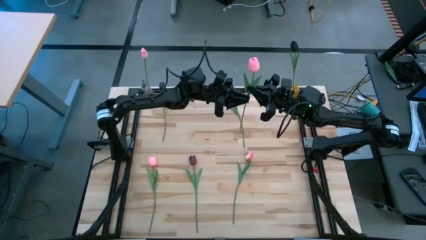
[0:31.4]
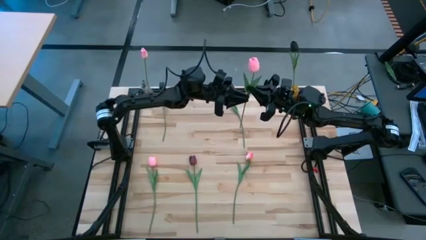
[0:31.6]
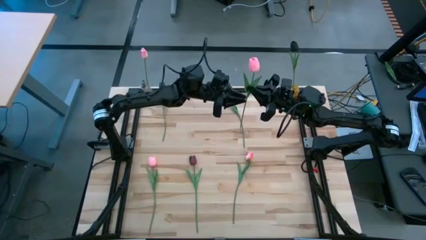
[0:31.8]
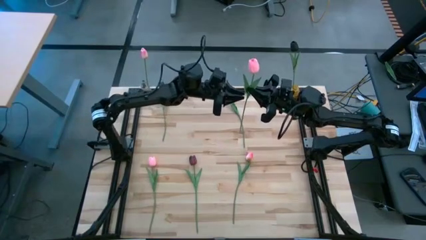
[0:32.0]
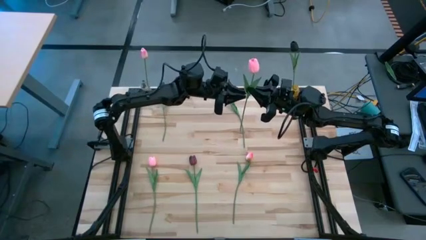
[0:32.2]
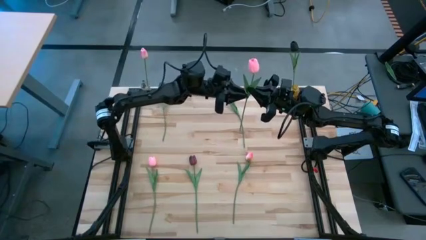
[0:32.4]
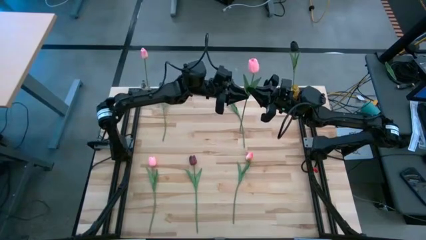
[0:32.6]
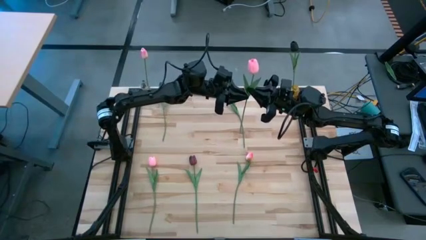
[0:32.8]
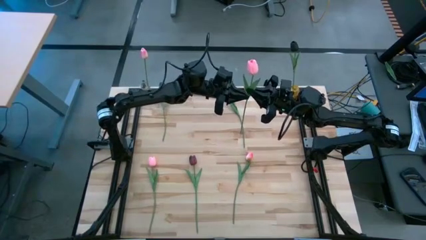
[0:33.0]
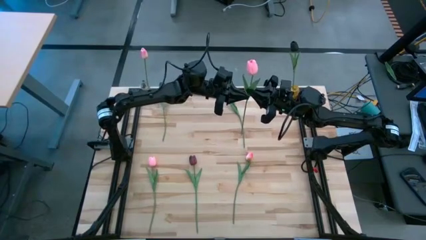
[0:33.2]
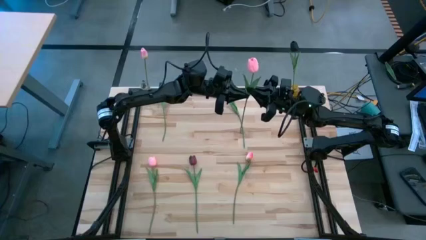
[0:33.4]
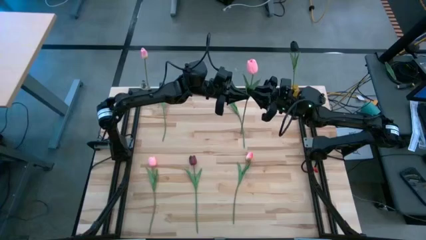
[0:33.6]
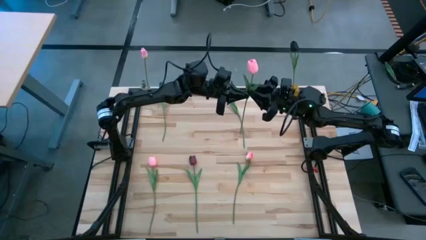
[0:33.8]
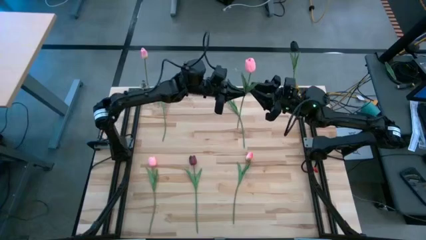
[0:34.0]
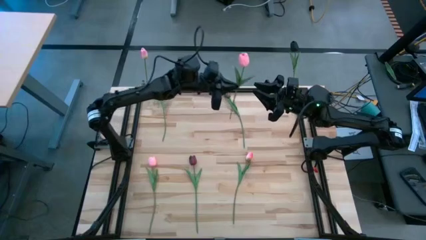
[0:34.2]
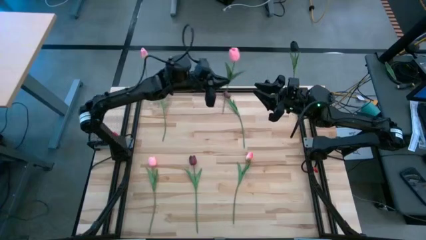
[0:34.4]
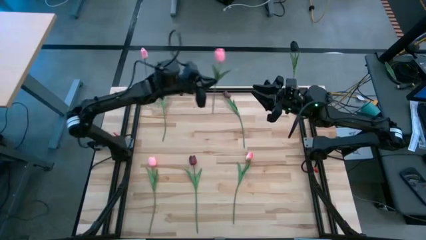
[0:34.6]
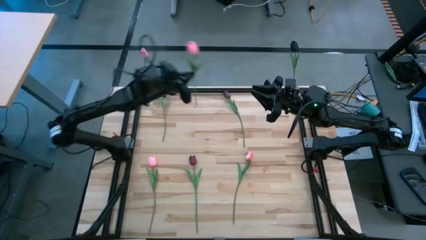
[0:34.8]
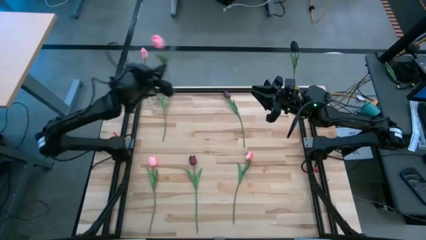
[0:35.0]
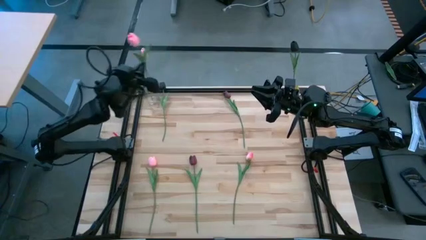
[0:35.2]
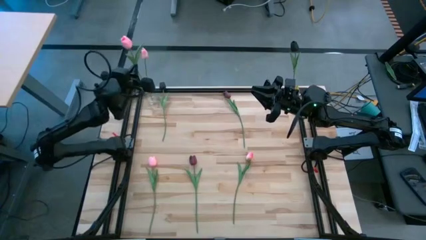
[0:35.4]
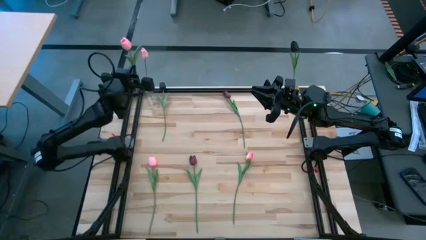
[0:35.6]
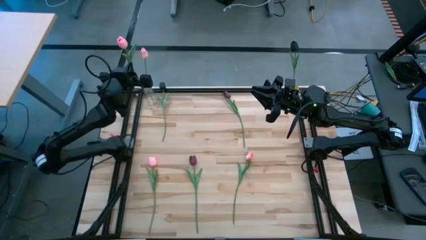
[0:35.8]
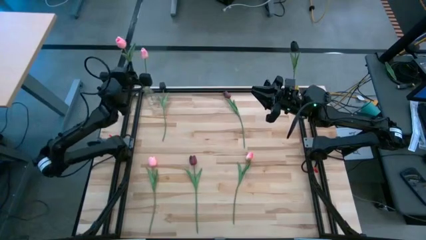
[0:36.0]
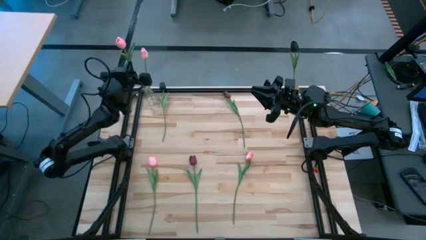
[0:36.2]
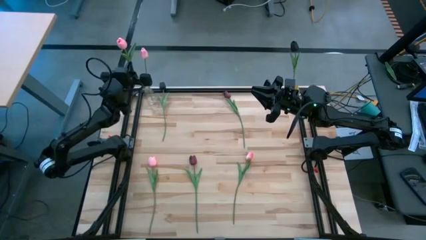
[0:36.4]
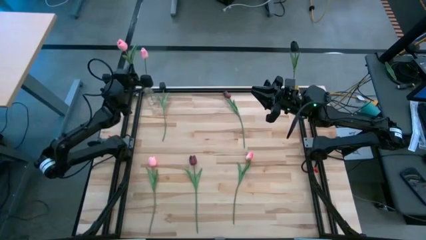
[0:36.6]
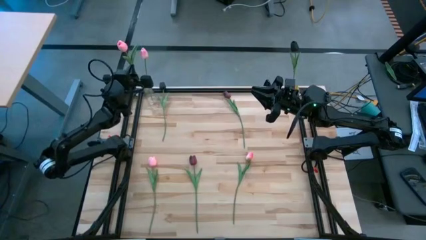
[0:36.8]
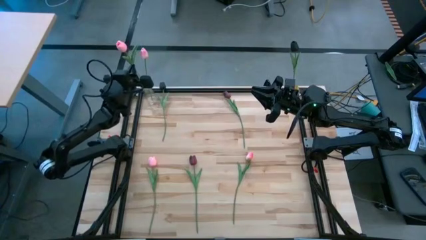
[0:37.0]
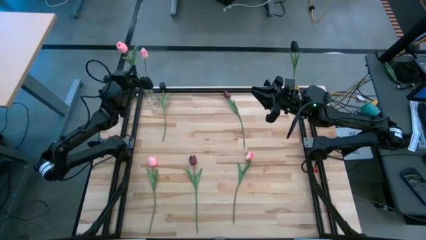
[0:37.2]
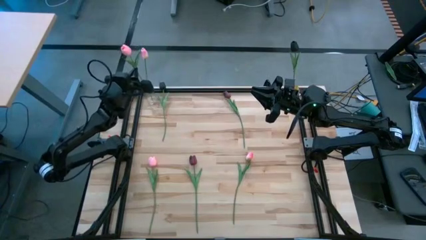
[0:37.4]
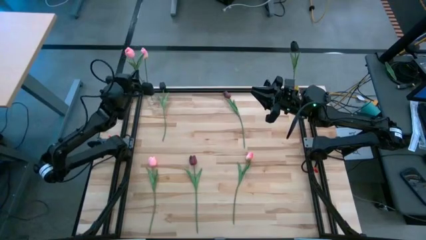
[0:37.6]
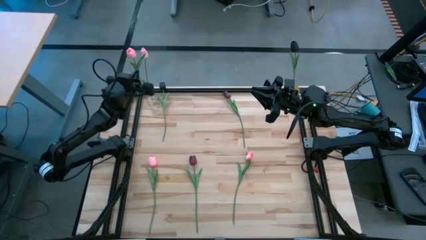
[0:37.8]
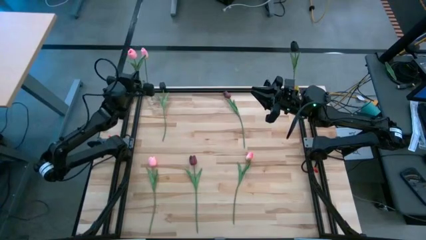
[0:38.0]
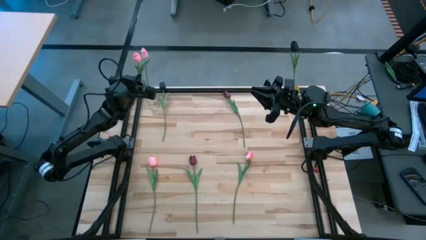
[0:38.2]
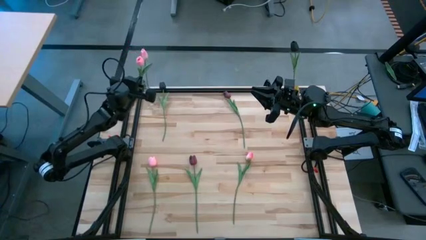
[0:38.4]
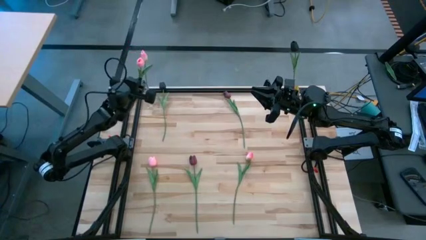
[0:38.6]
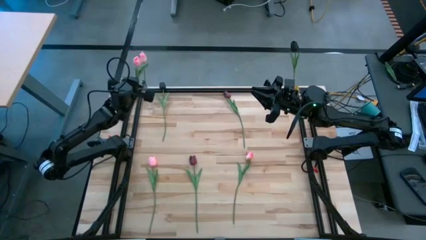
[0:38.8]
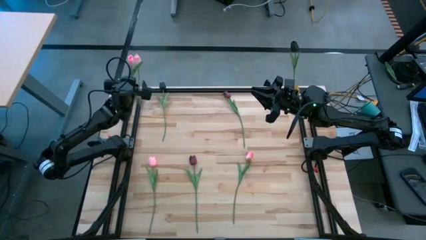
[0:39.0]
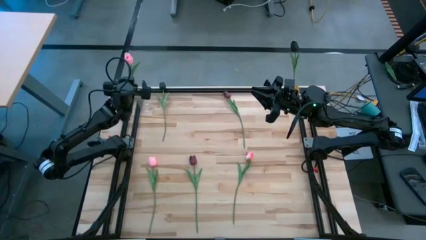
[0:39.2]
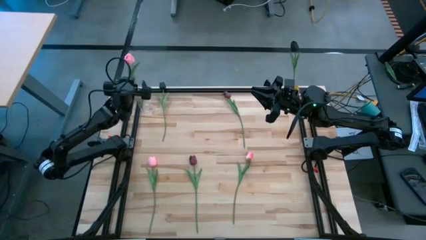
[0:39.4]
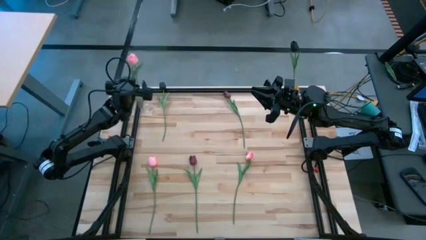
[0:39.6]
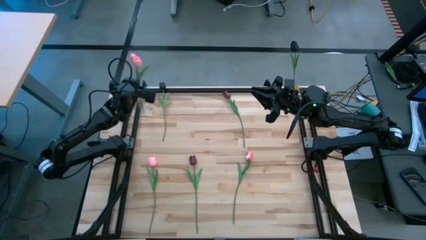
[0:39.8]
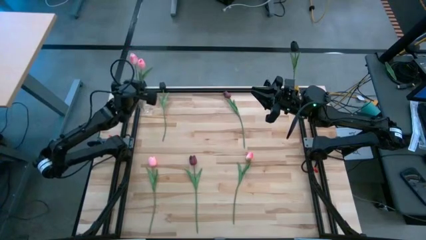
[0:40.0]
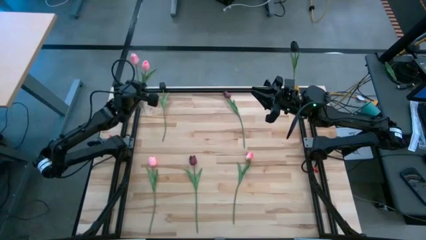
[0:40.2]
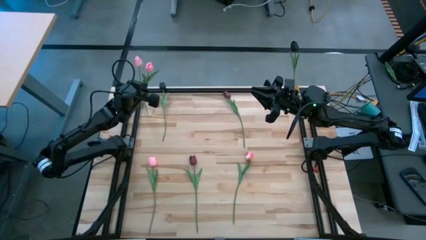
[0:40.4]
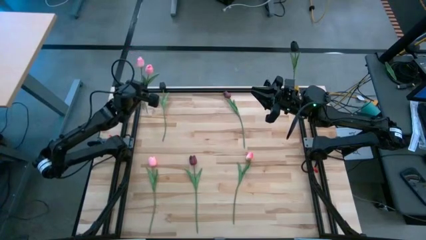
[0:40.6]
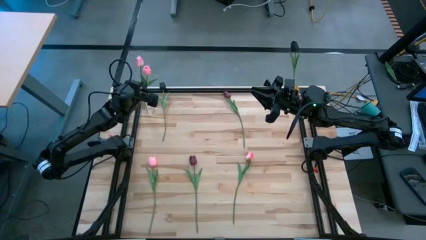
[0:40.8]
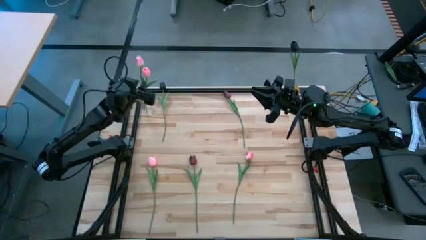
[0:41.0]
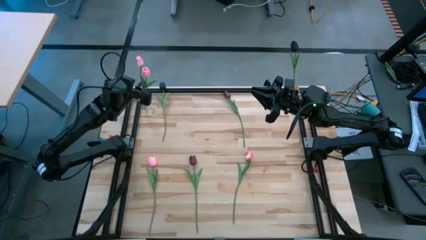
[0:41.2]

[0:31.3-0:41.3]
Task: Sort flowers into vase by color
Put the top right pink flower into the transparent vase

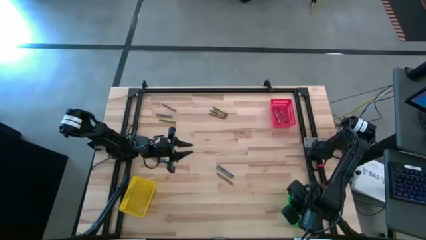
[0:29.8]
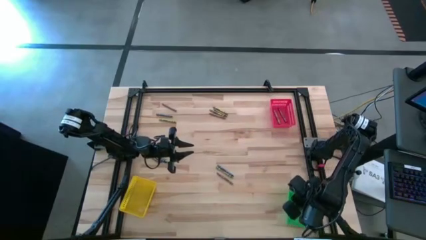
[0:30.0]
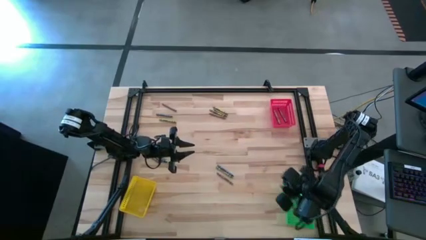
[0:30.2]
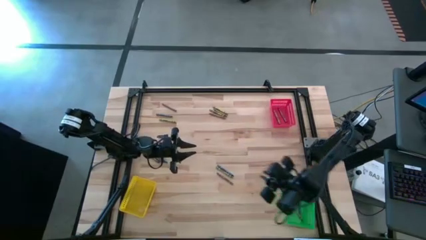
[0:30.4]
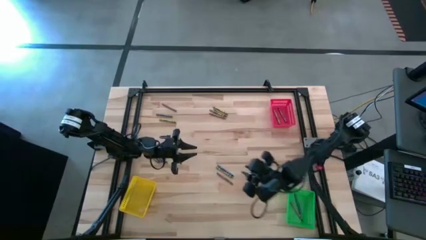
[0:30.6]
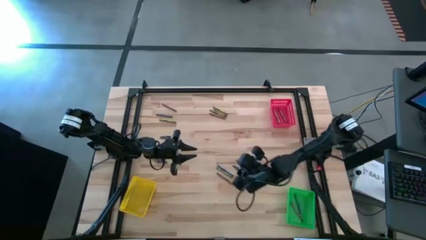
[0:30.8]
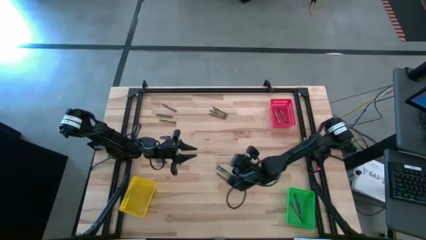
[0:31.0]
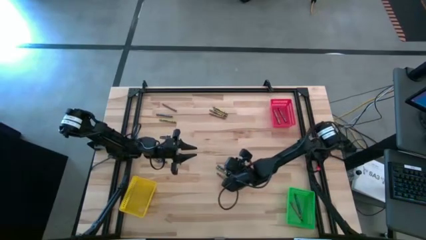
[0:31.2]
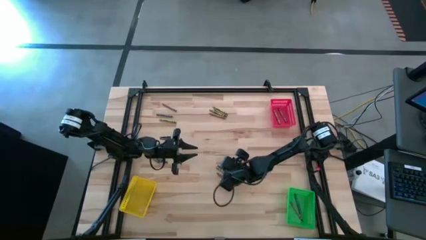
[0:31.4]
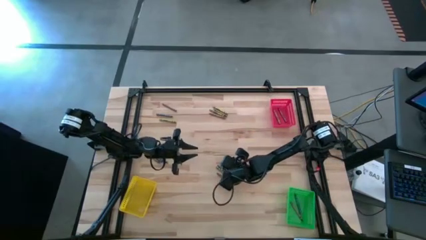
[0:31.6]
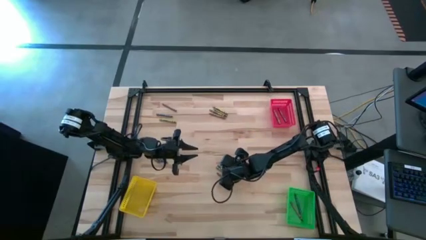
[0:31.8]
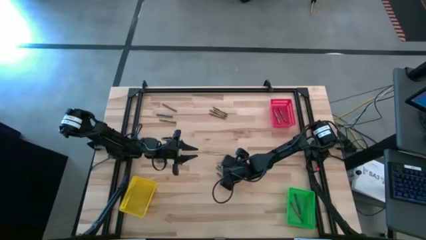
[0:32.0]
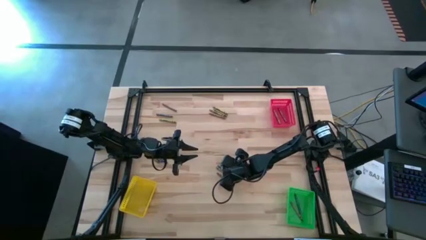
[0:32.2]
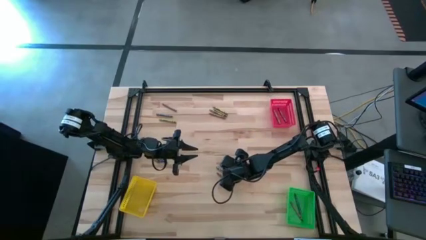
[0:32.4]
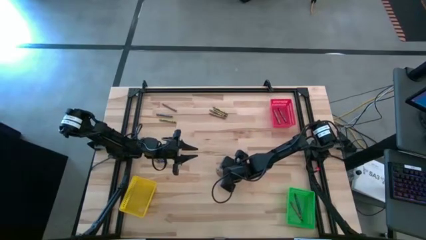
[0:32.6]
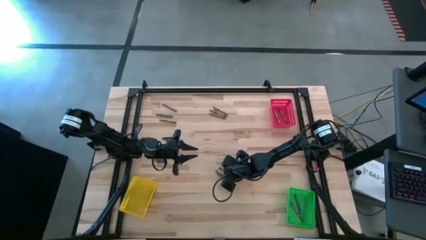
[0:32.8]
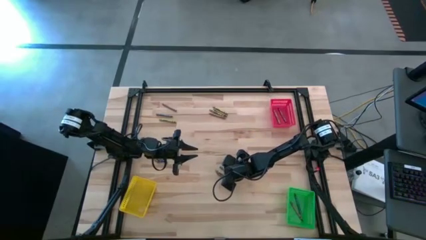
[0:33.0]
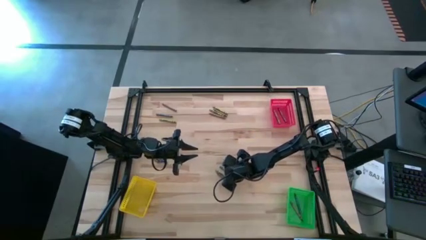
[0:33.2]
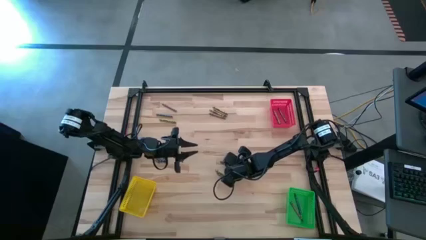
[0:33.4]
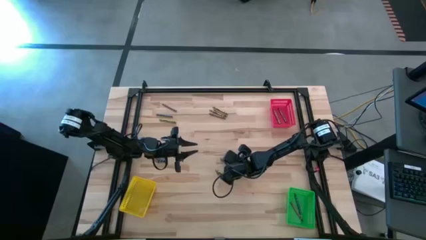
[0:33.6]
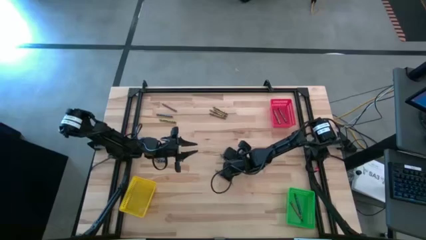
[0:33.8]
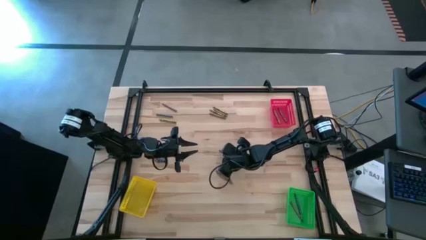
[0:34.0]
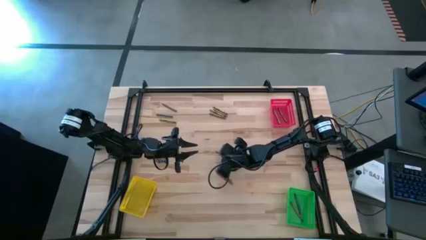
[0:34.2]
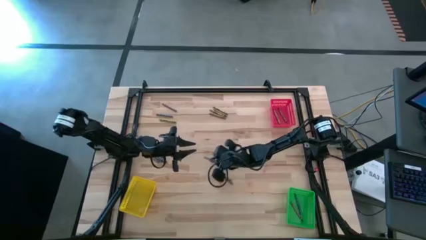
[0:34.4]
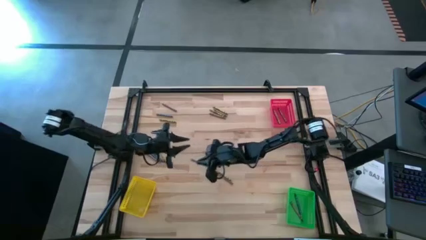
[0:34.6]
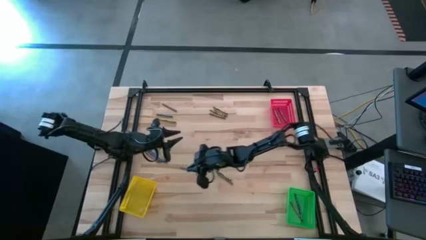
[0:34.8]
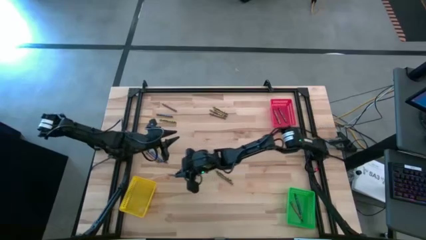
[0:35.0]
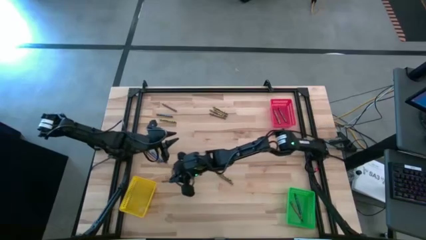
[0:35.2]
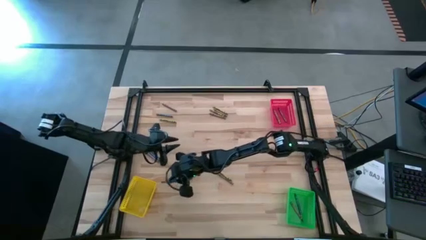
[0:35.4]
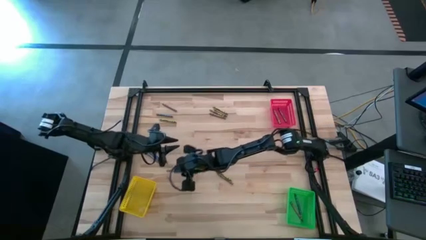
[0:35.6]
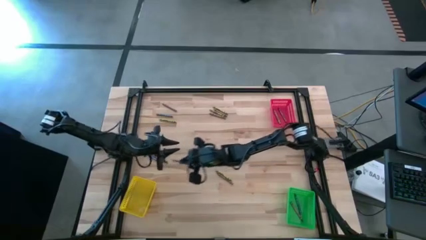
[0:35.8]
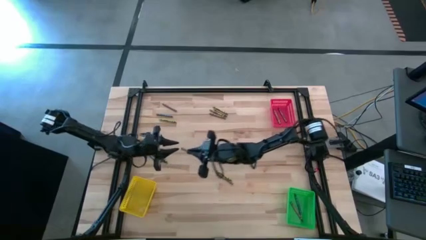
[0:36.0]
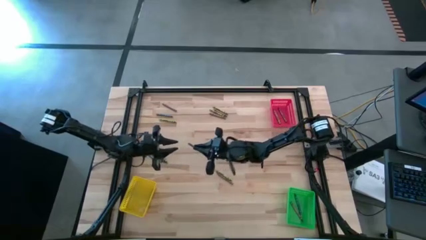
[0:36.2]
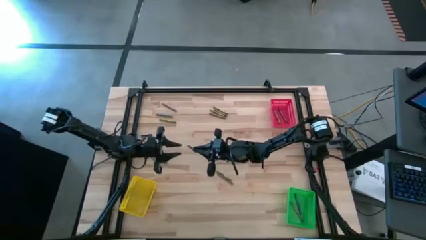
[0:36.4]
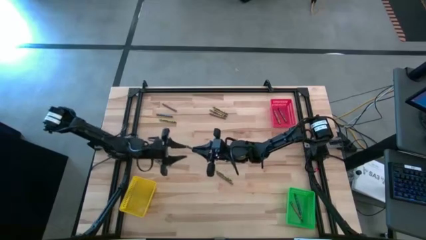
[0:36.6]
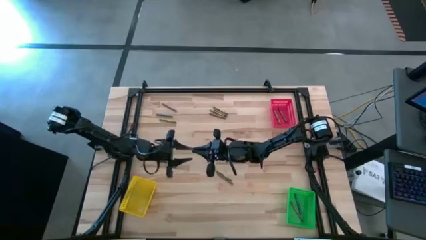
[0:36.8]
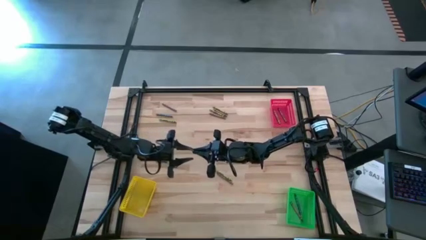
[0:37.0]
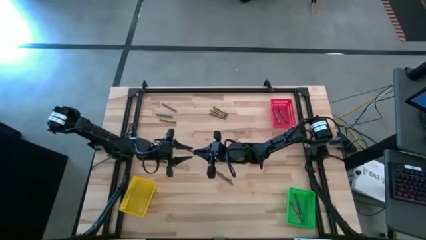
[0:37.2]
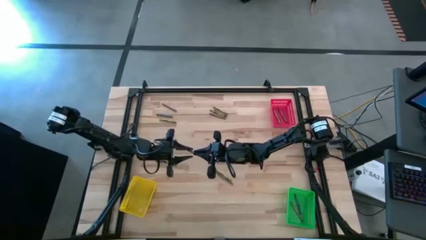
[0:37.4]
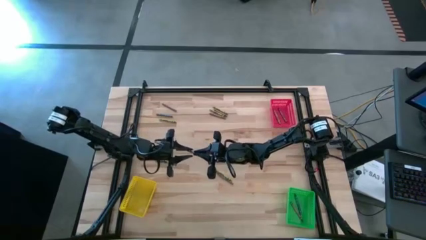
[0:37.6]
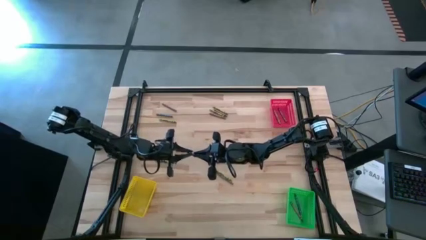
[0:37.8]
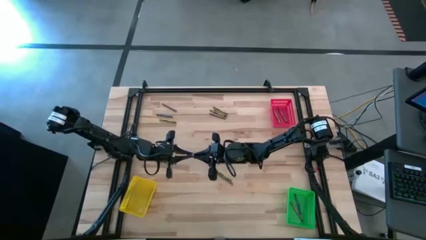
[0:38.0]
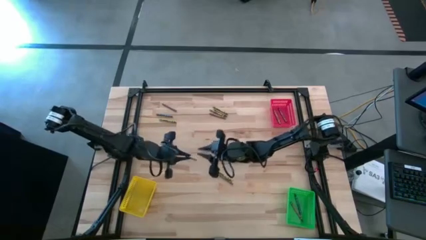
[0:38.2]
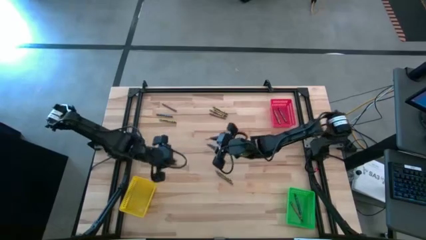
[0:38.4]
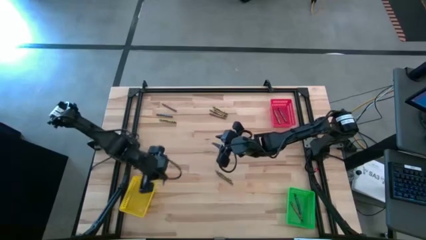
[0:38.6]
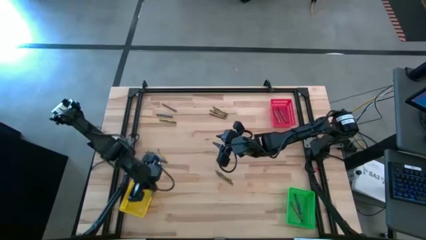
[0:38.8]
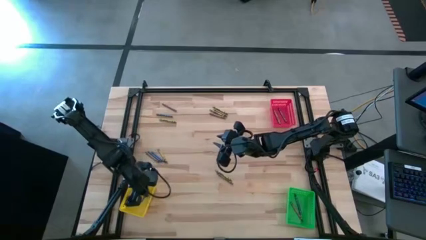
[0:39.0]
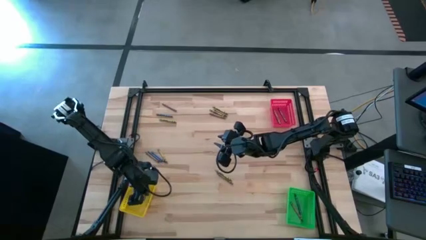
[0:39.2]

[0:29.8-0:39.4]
Task: Sort crayons
Put the blue crayon into the yellow bin
